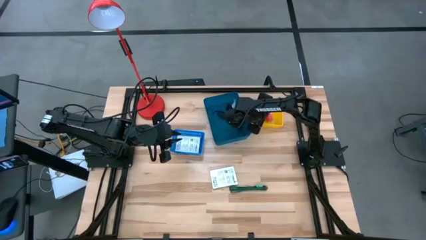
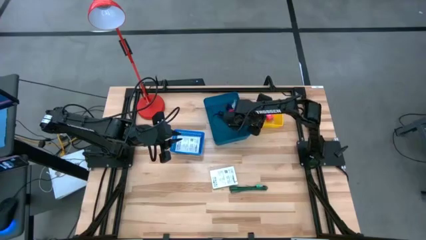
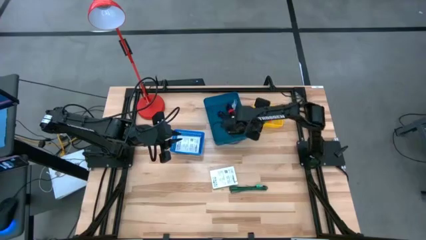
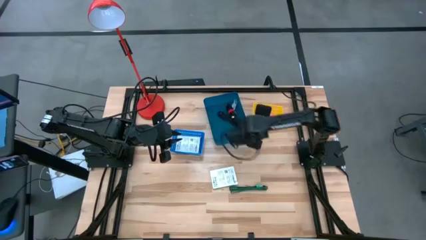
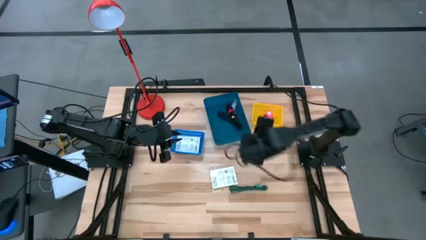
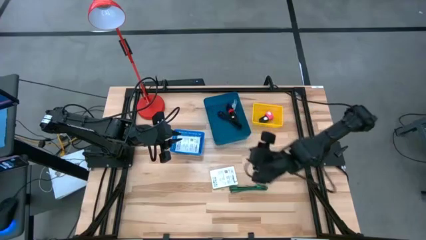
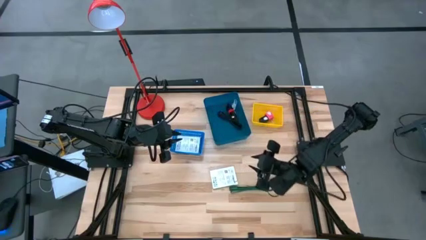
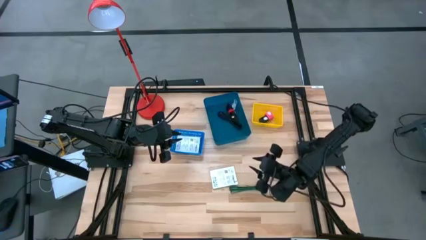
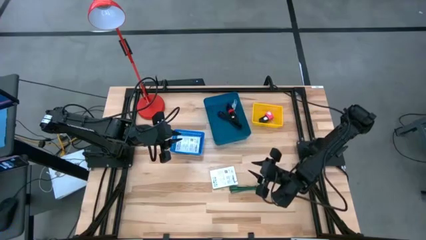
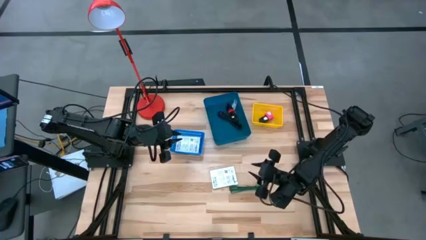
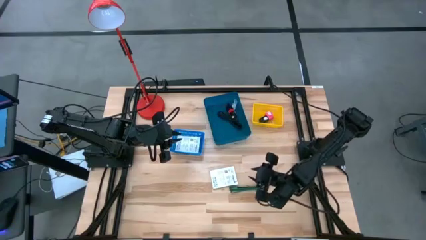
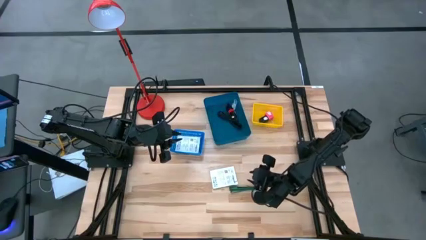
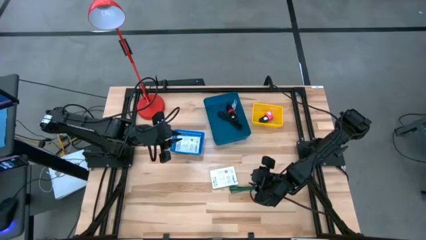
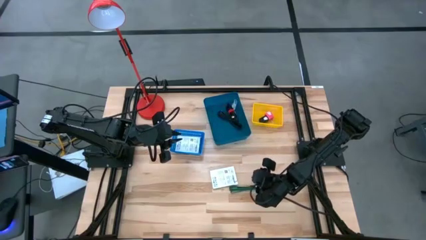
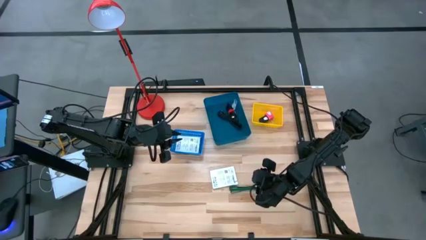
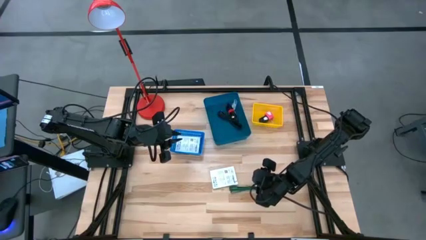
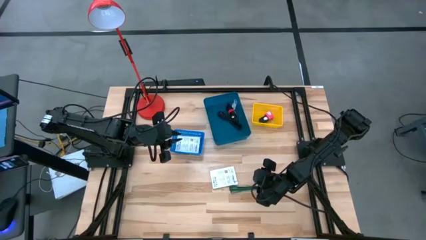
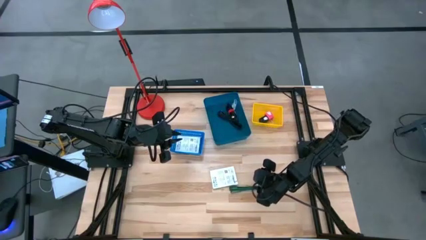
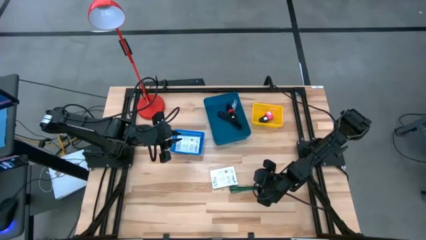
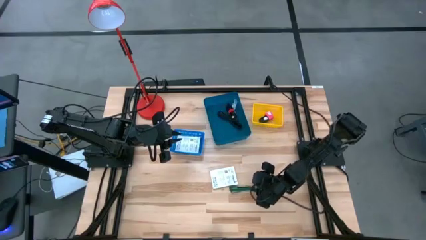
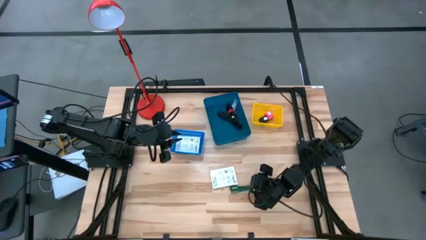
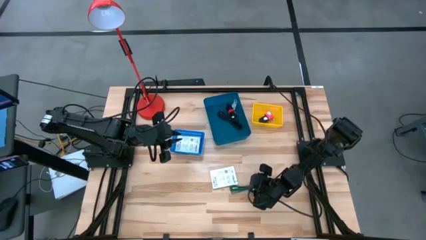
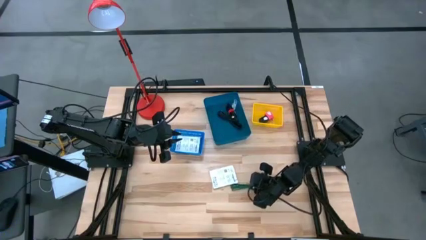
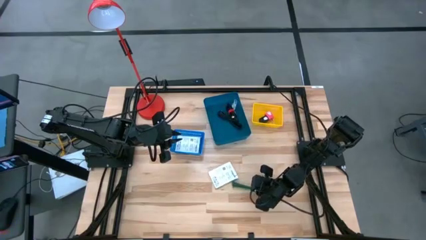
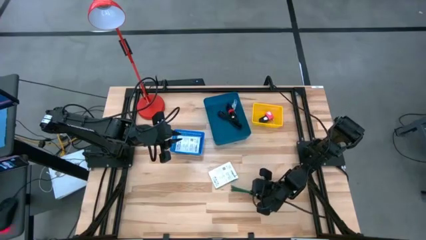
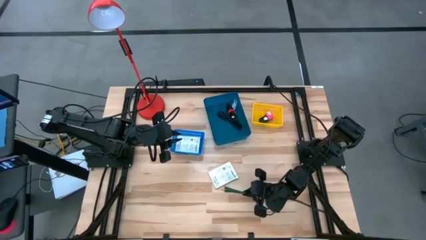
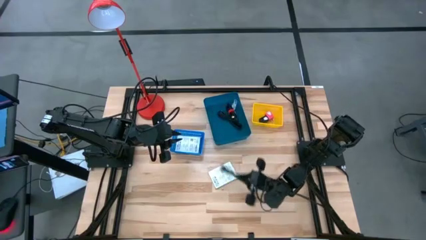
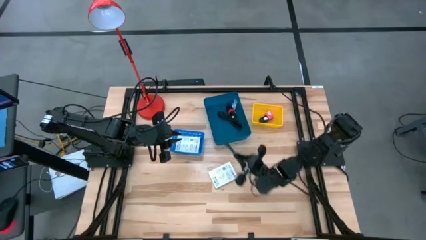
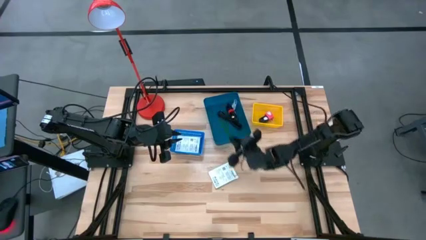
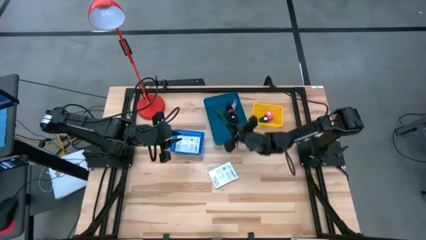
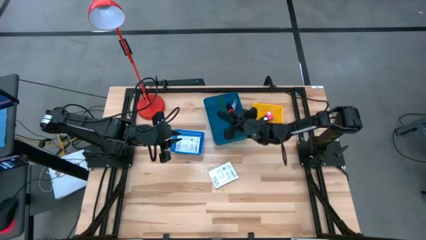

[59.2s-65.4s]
Task: Pick and place items into bin
Put the green charger cable into the blue bin

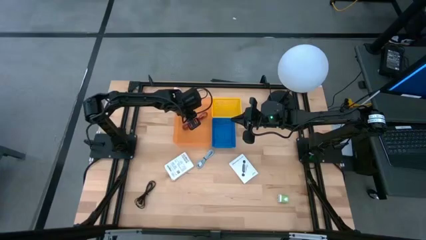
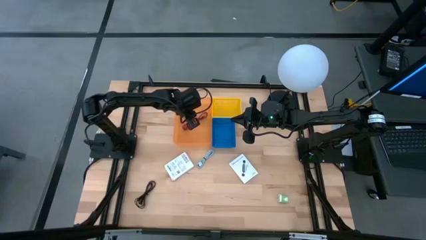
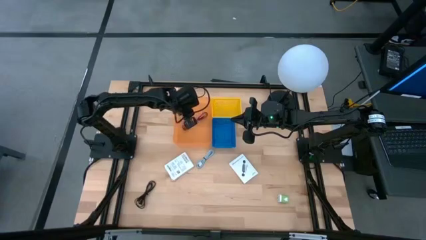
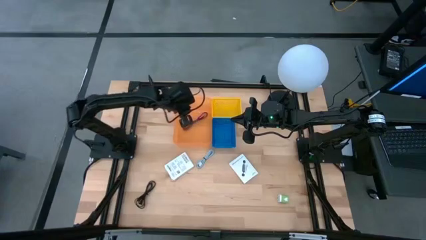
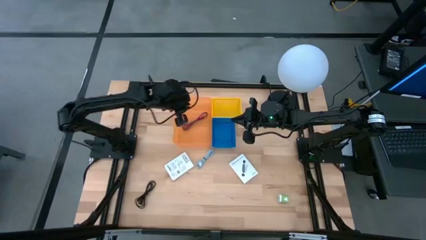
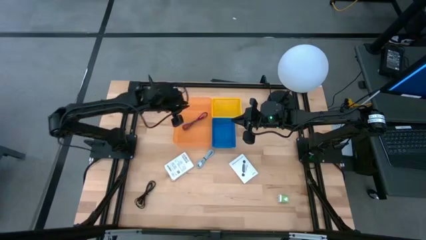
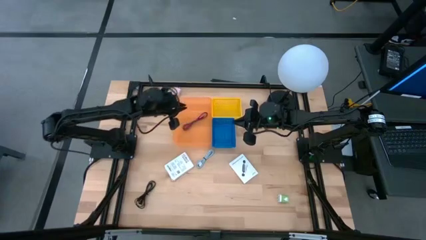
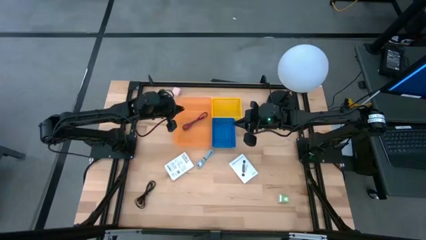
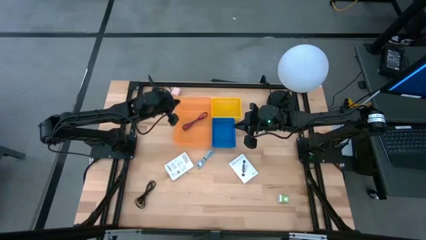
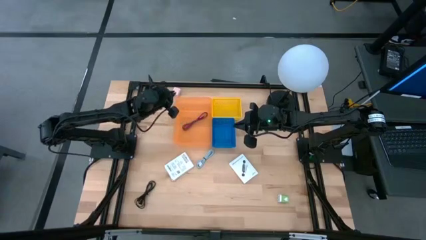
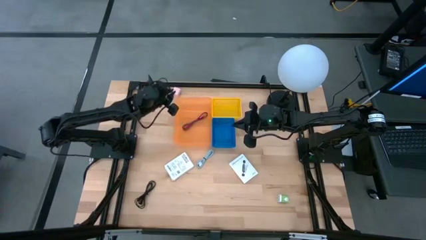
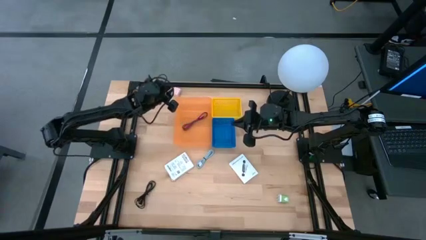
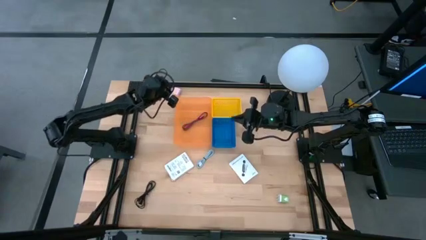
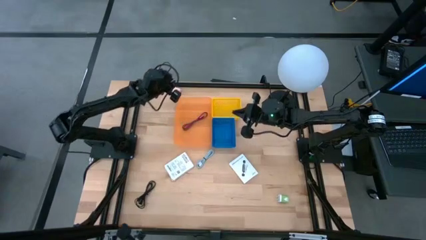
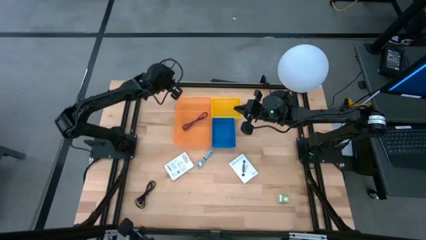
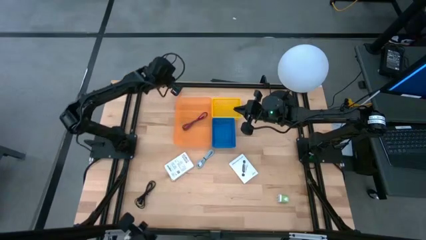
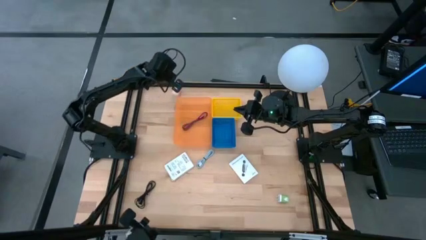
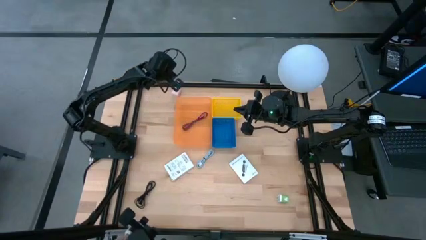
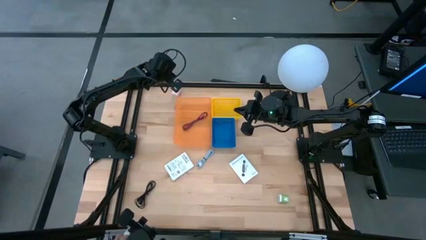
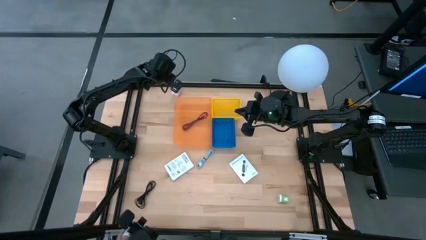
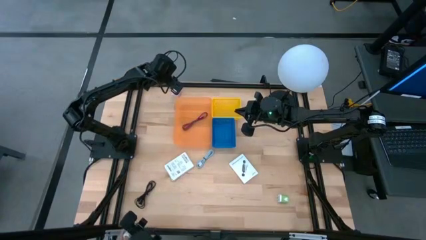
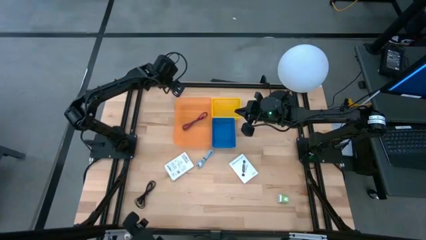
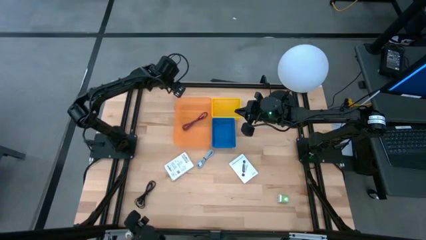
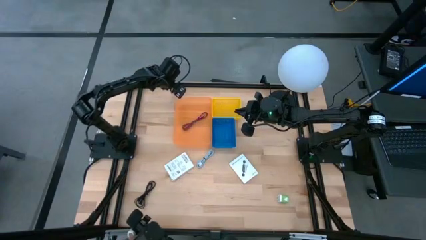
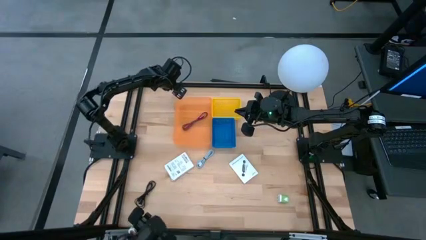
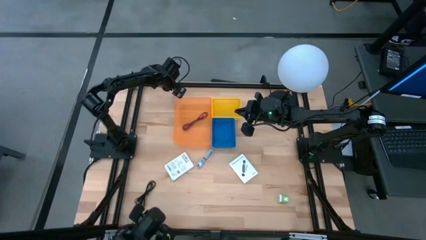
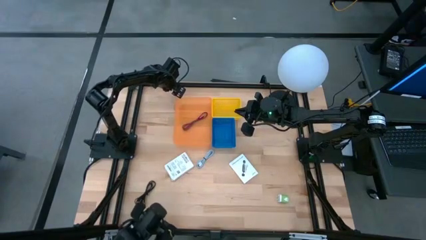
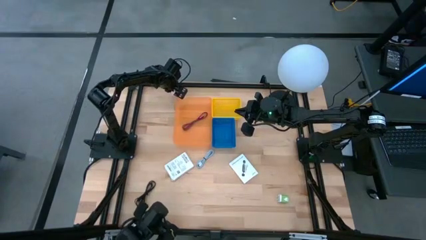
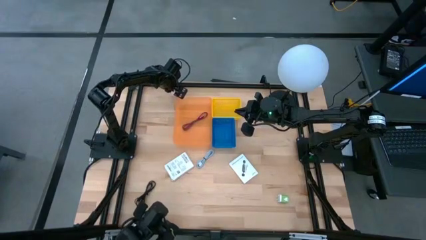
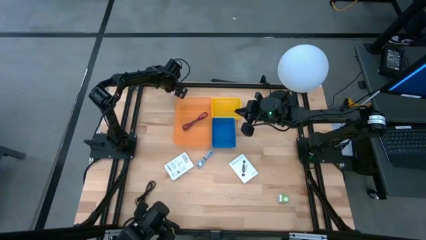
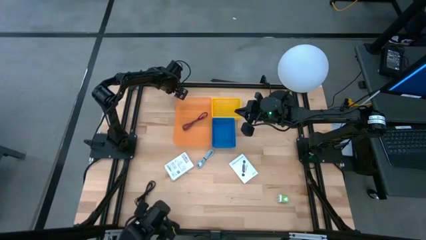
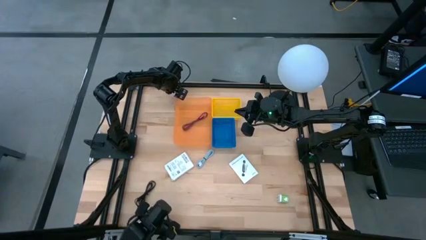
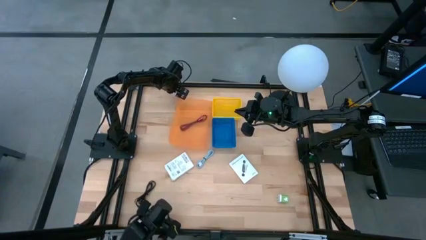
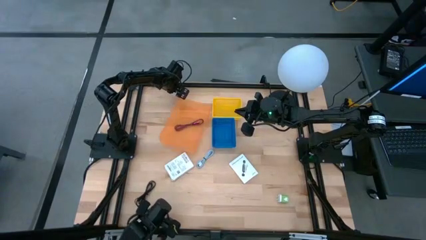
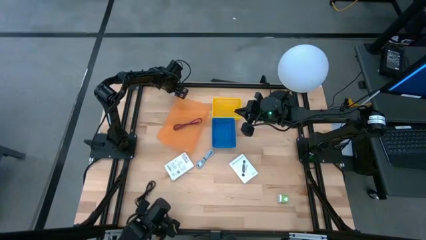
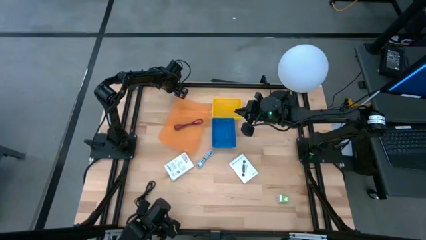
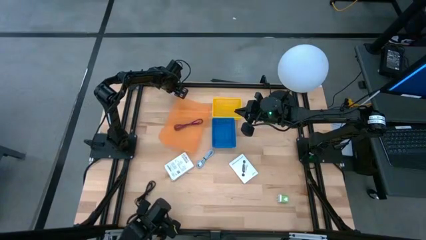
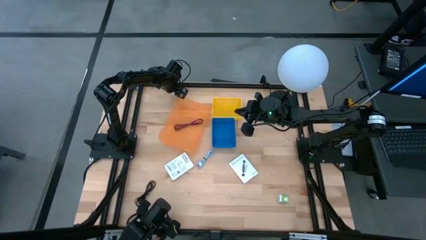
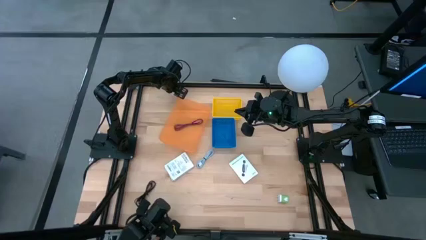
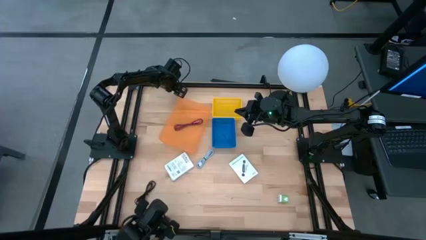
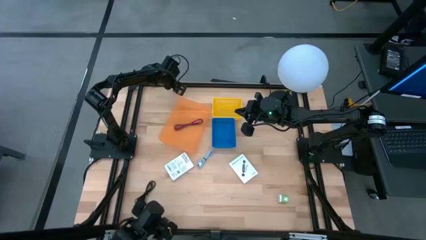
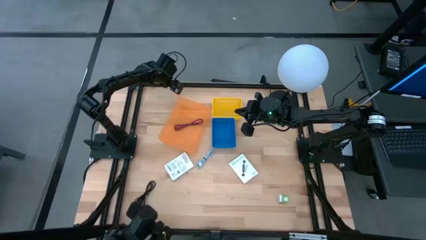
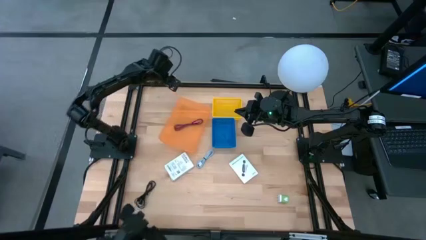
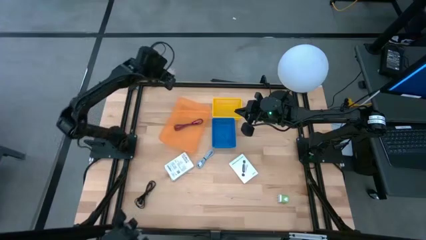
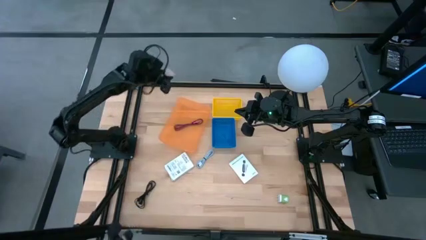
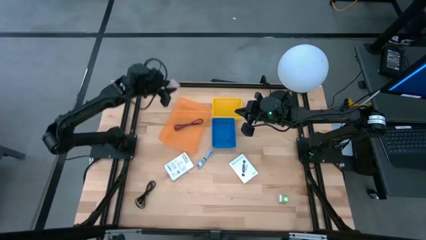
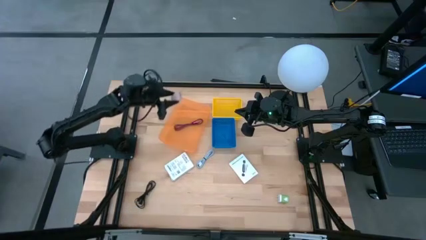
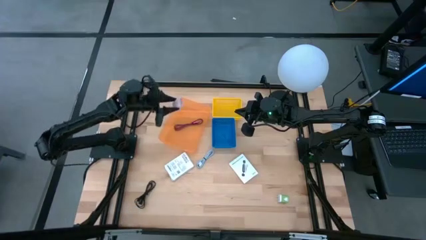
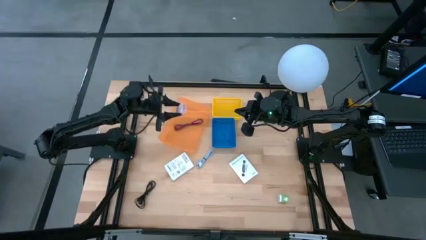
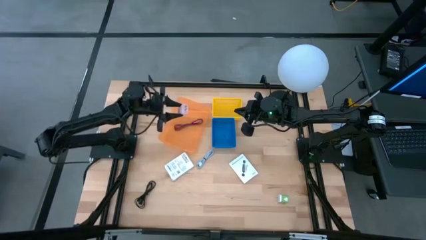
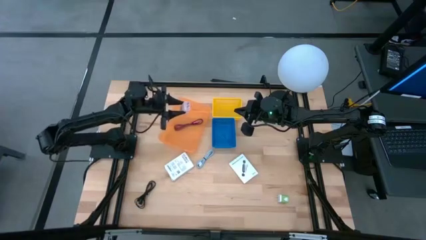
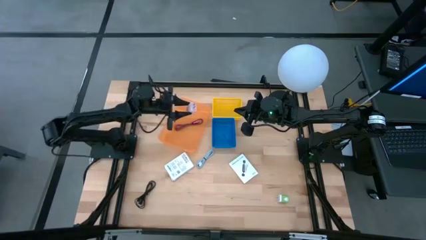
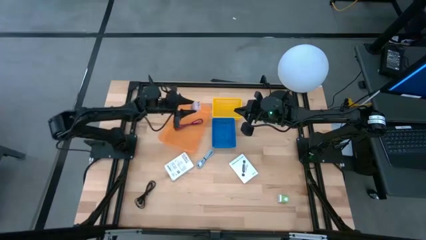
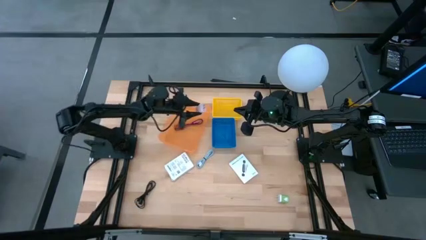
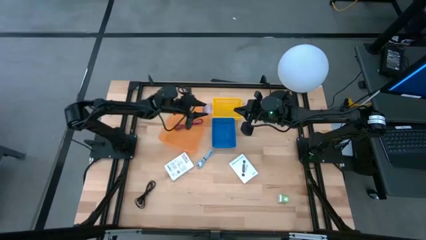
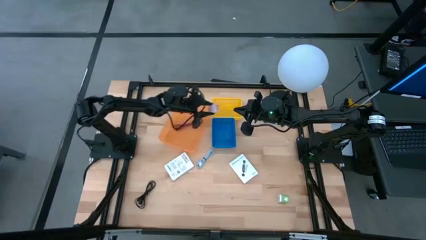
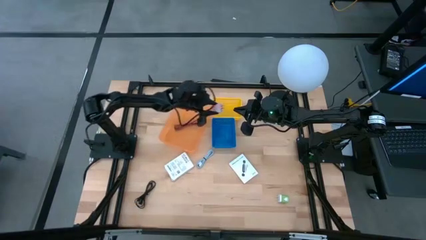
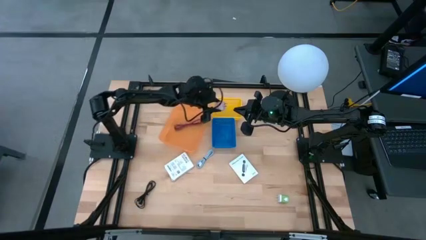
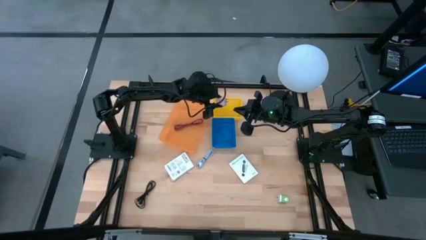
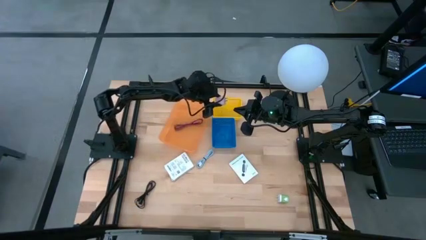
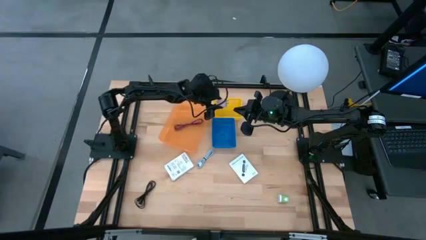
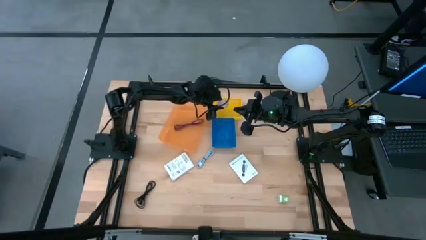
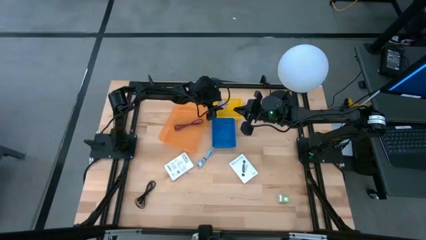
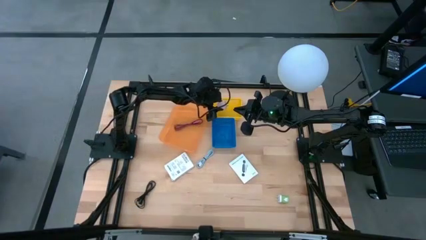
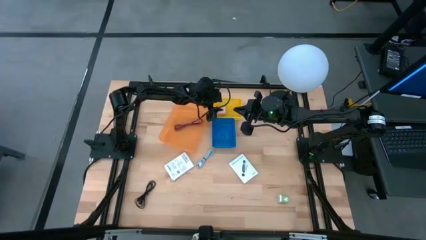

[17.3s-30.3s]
Task: Pick and place items into bin
Put the pink charger adapter into the yellow bin
